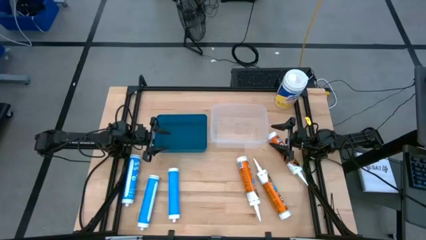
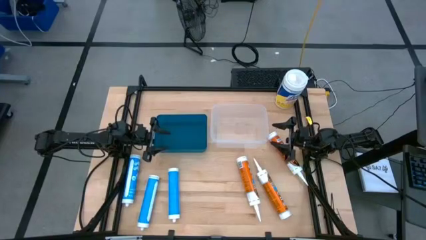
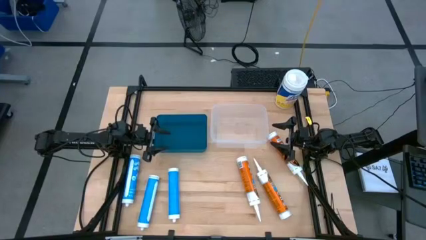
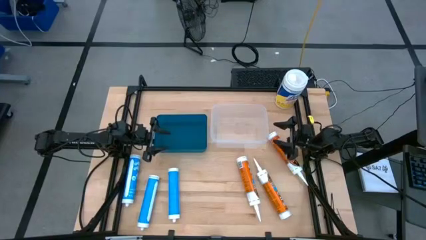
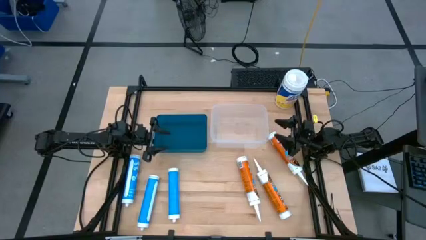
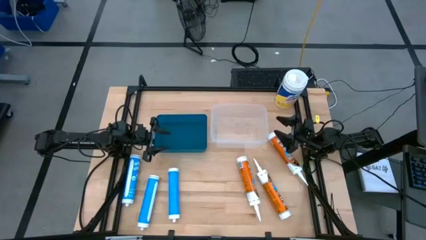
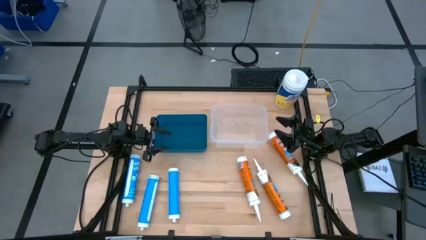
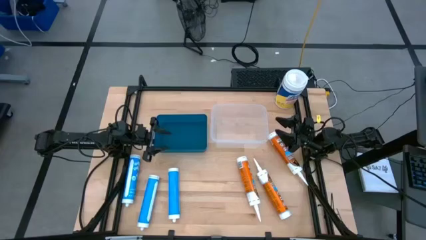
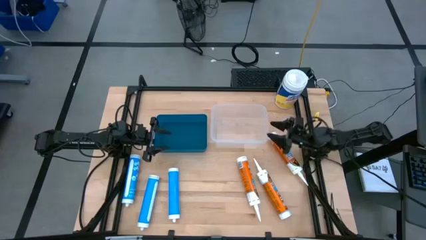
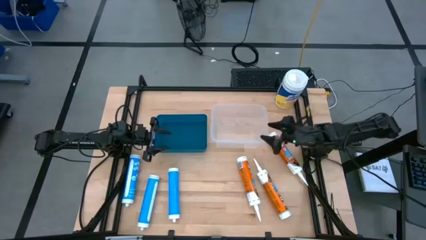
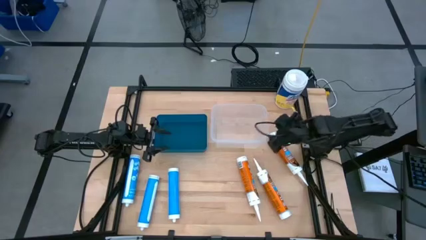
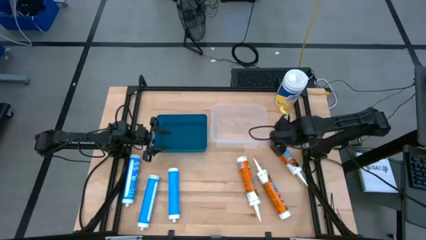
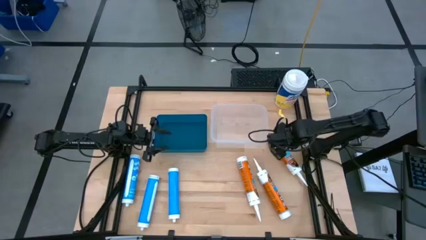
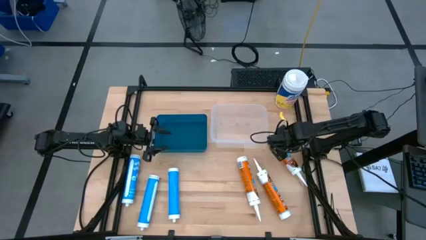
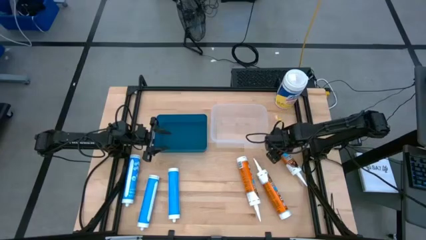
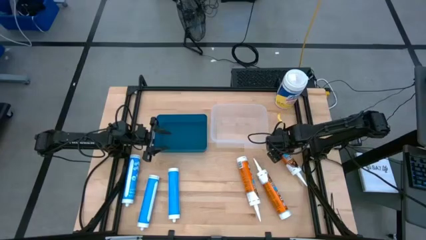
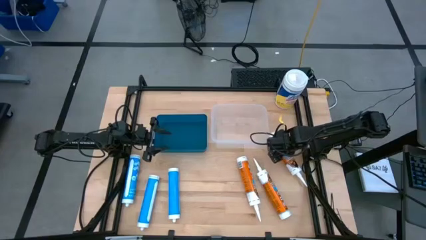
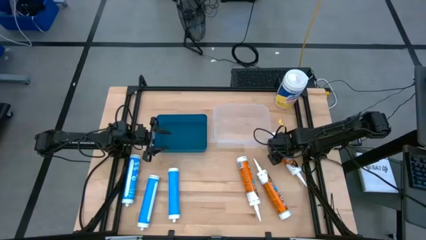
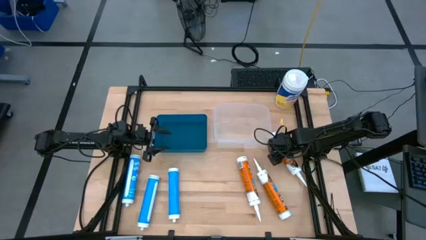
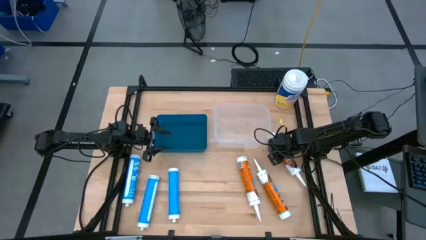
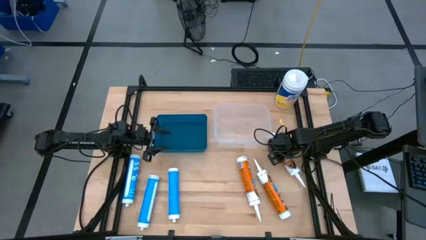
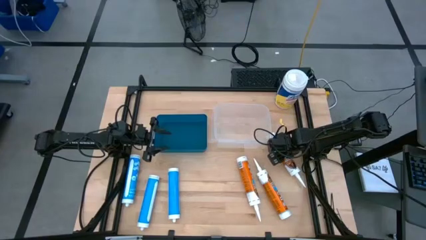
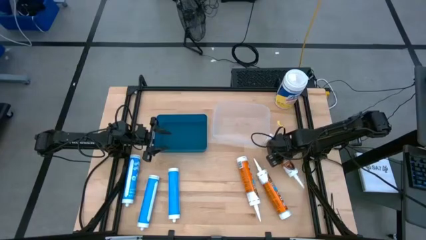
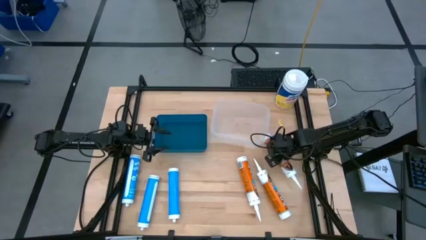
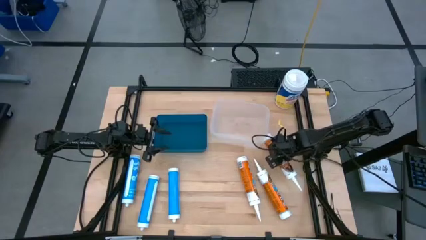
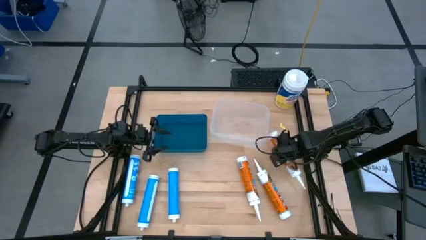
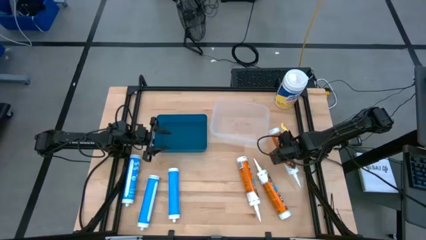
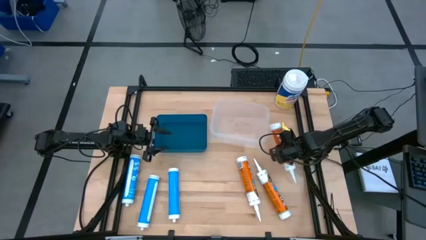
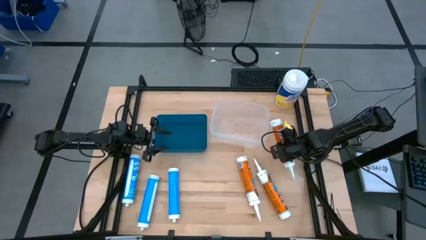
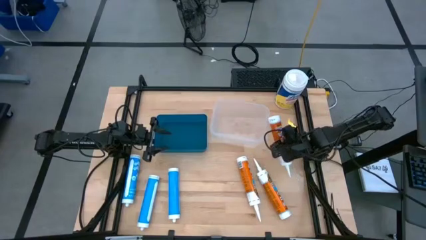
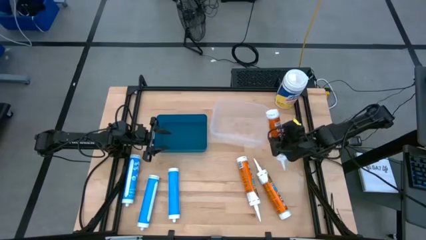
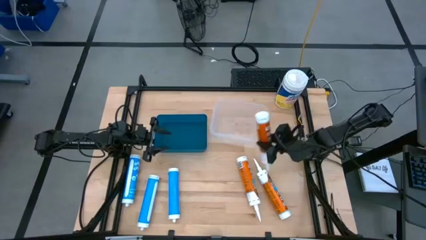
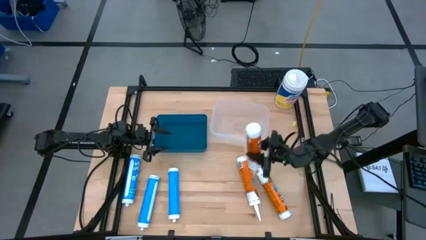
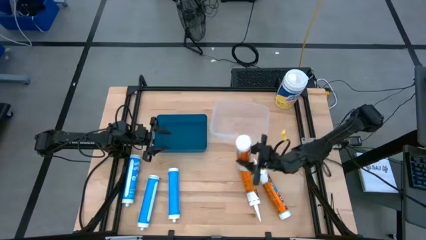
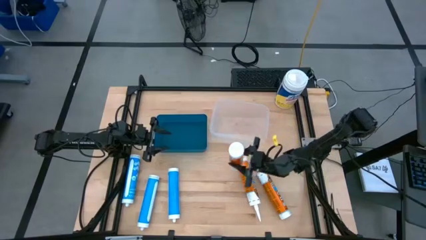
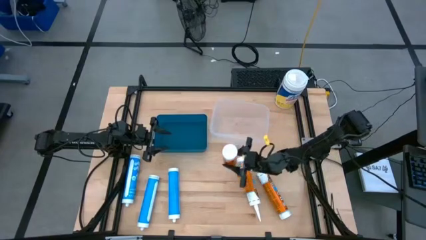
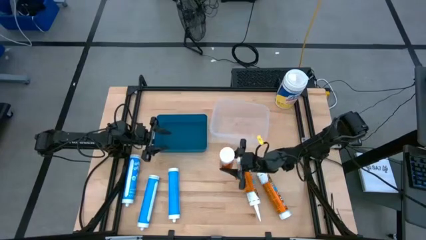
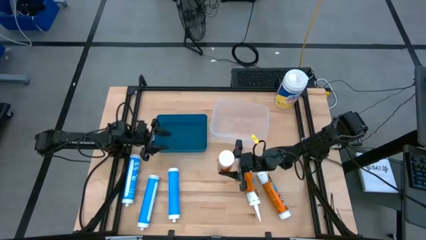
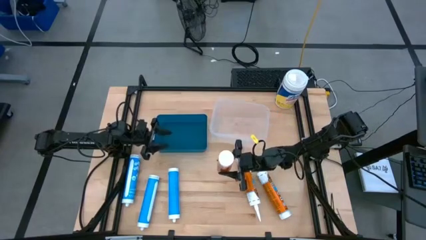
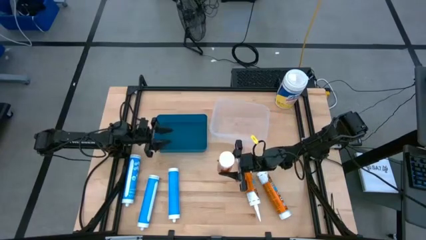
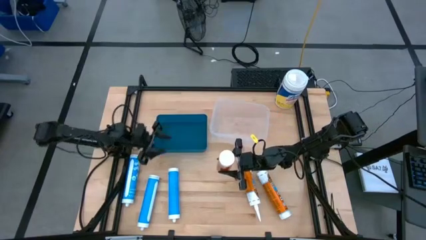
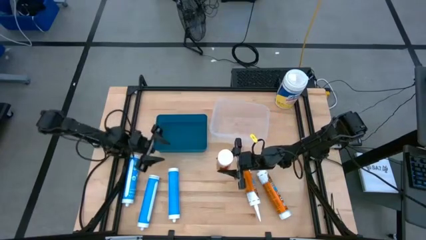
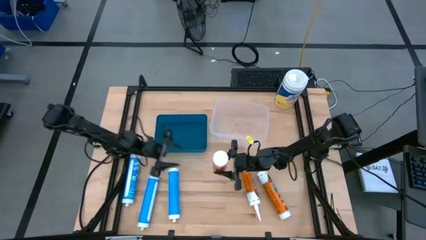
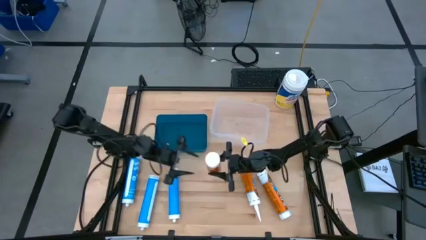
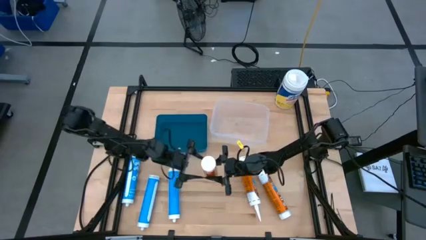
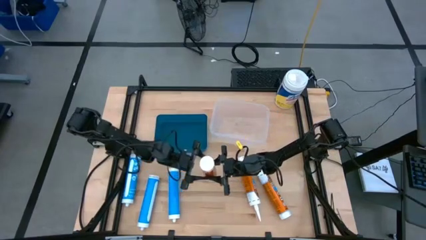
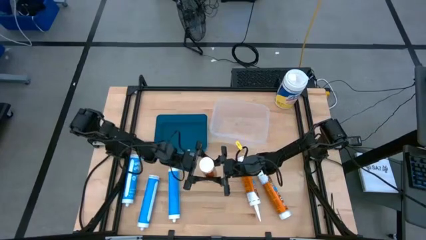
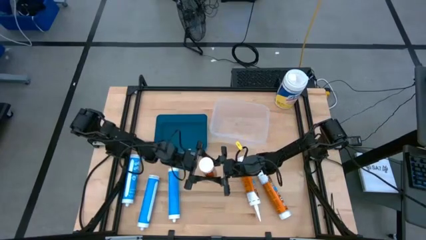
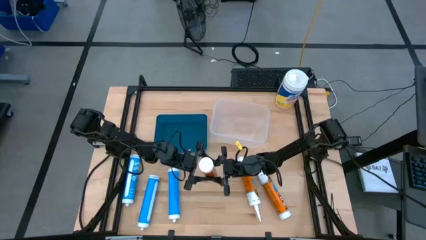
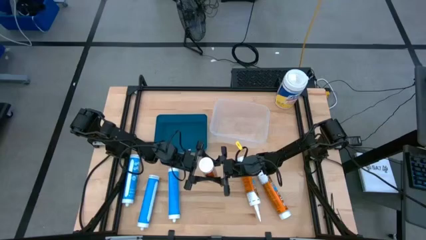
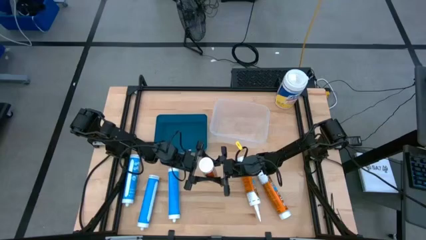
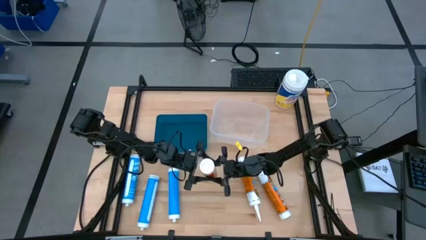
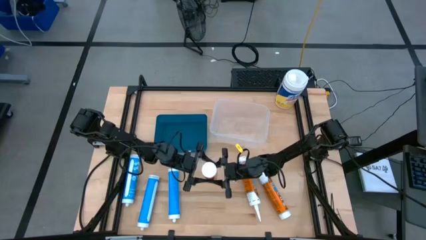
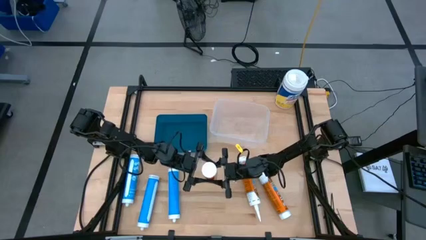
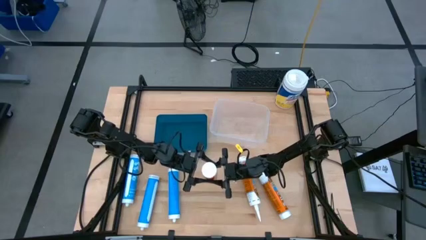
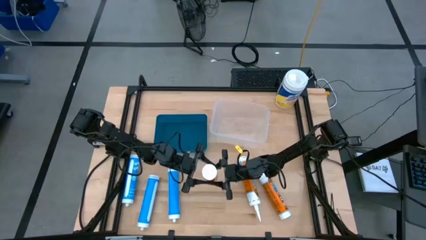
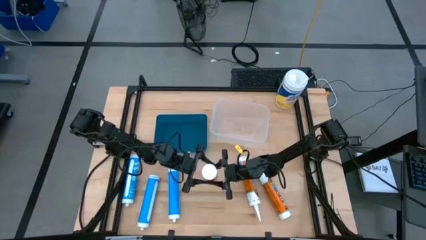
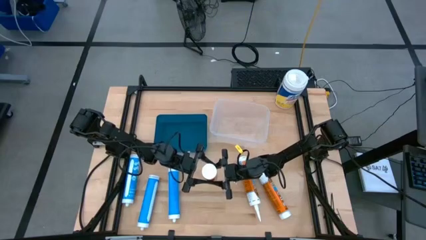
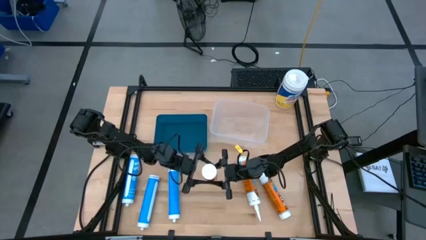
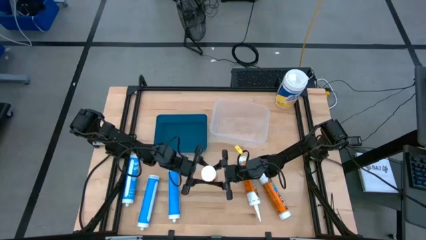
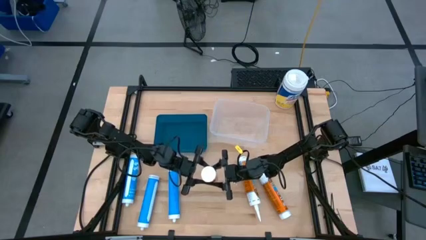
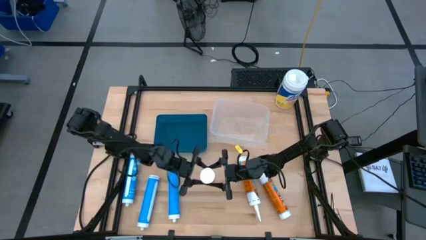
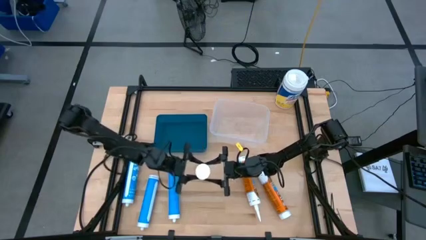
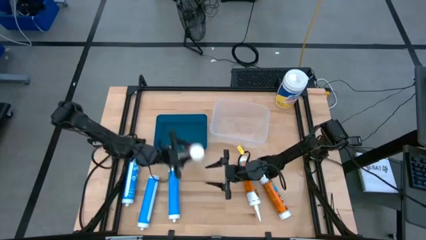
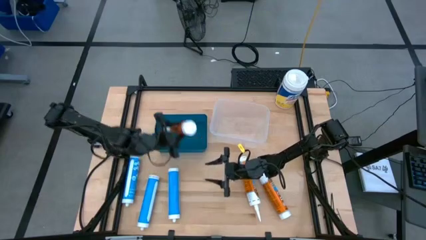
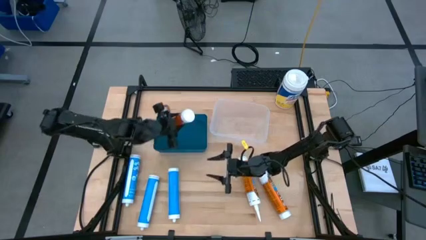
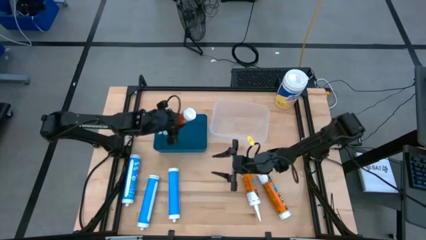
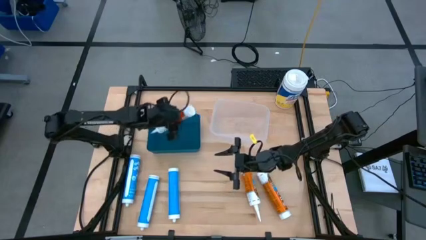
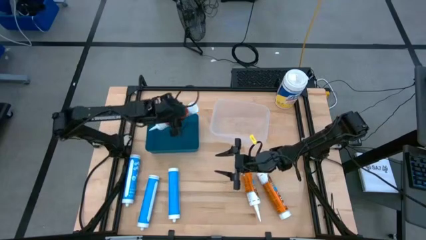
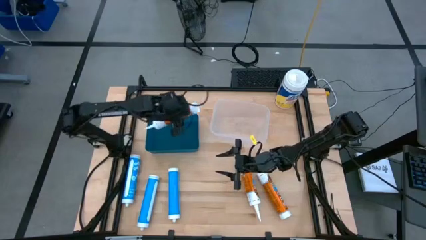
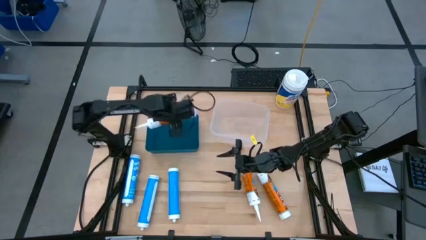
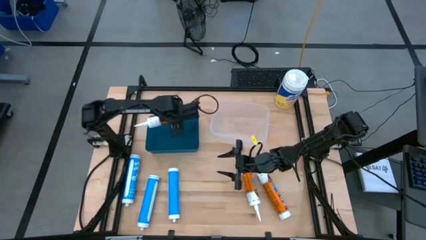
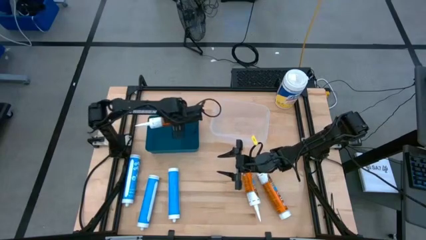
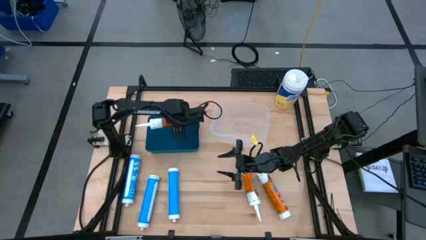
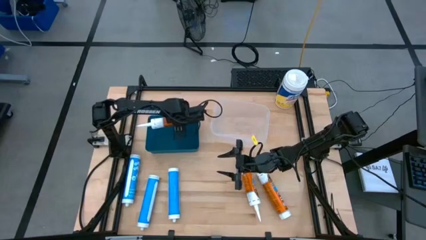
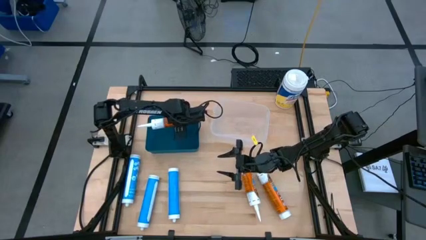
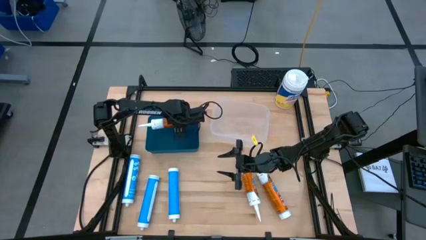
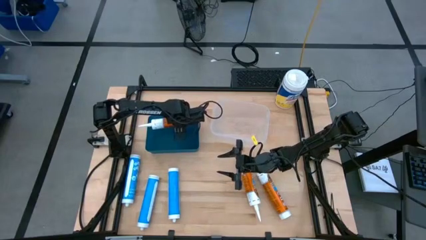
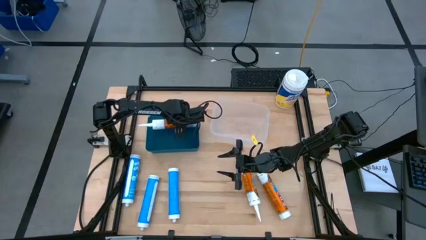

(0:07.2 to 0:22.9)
Task: Pick & place silicon tubes, Sealant and Lysol wipes
Put the top right orange sealant into the blue bin
